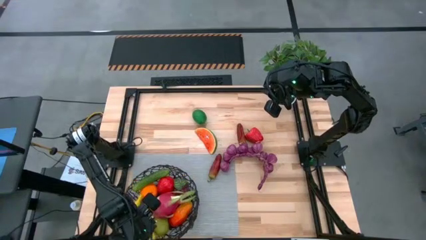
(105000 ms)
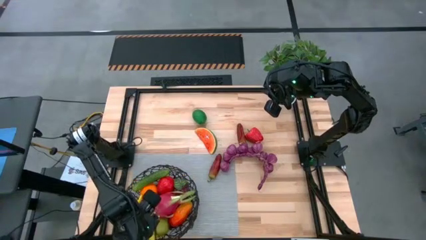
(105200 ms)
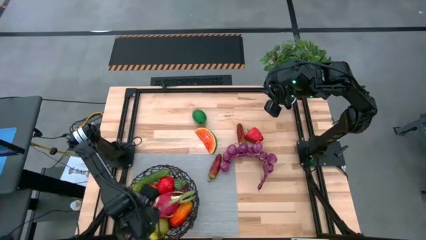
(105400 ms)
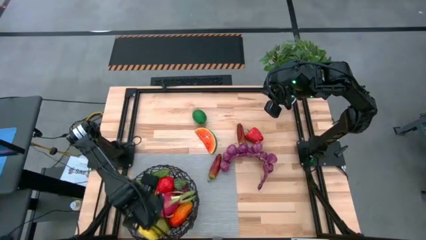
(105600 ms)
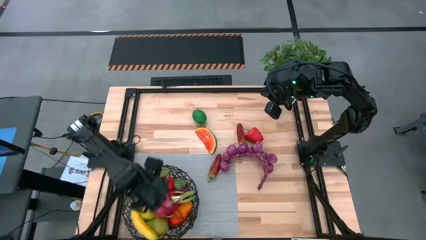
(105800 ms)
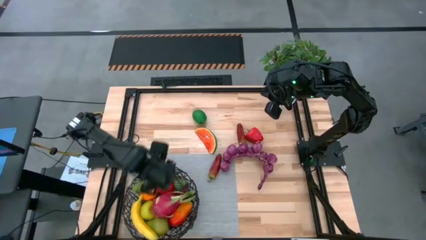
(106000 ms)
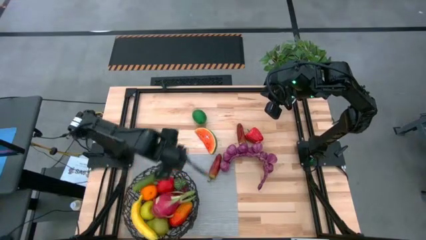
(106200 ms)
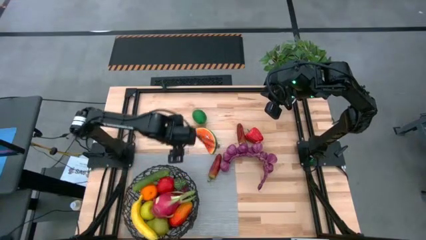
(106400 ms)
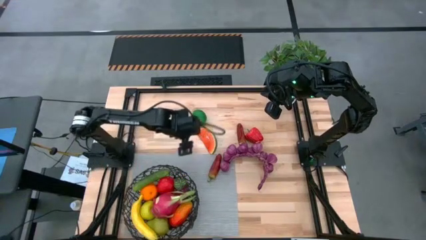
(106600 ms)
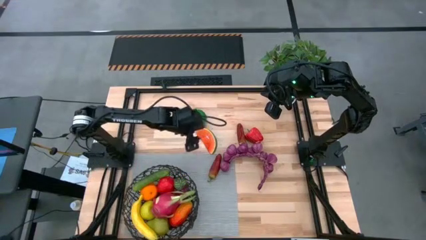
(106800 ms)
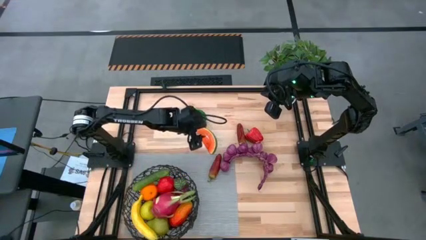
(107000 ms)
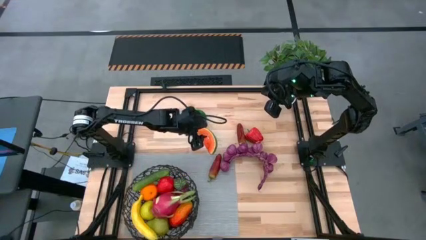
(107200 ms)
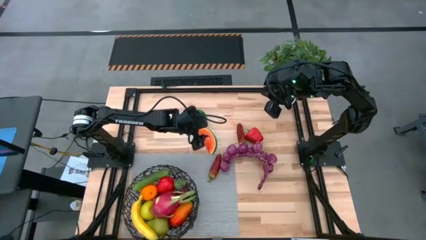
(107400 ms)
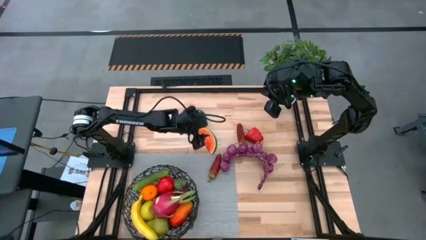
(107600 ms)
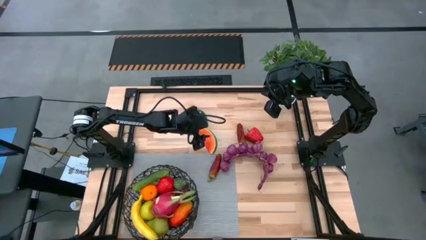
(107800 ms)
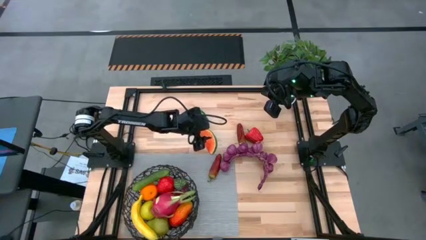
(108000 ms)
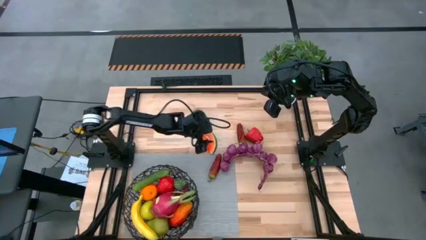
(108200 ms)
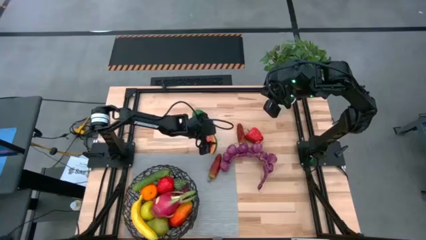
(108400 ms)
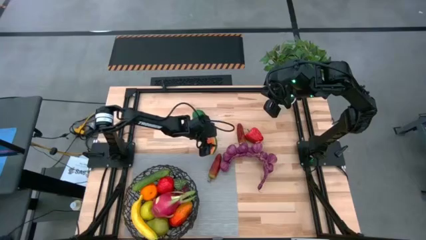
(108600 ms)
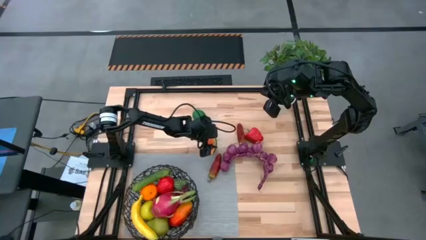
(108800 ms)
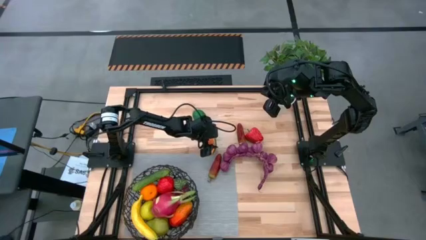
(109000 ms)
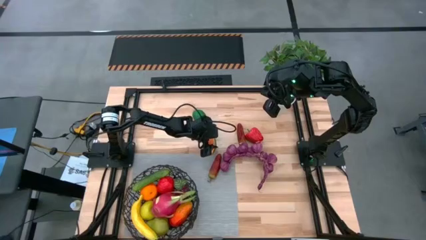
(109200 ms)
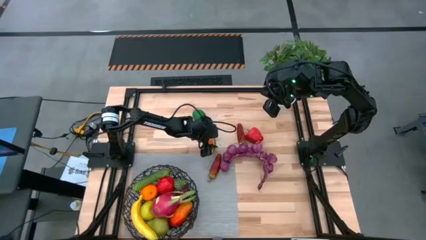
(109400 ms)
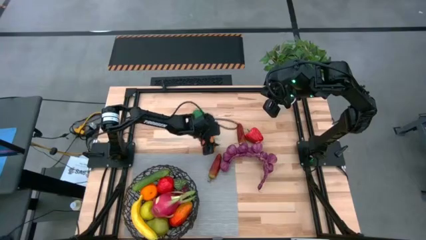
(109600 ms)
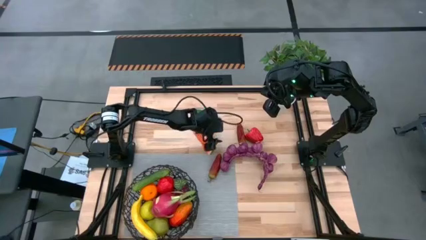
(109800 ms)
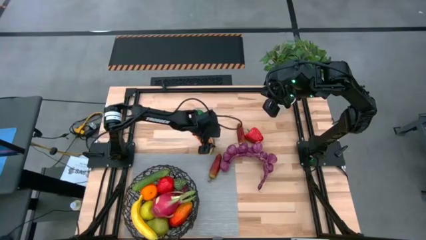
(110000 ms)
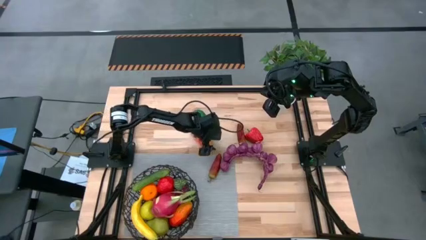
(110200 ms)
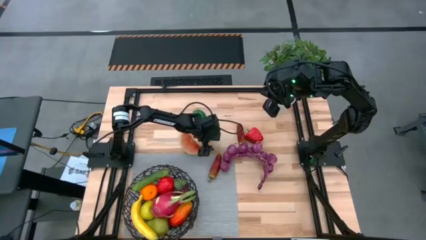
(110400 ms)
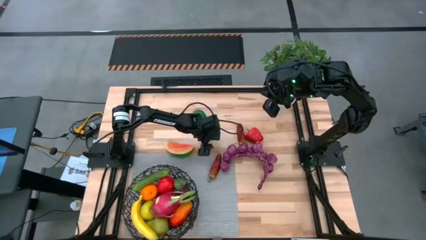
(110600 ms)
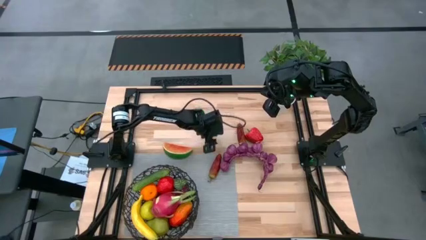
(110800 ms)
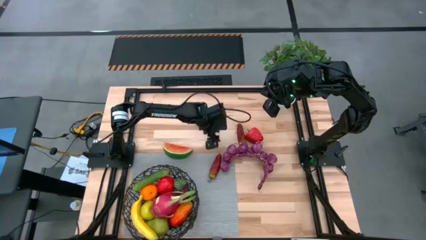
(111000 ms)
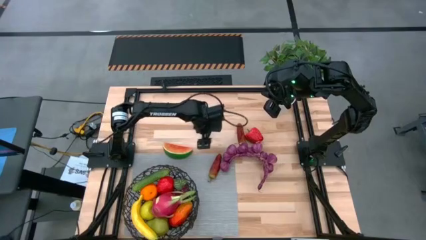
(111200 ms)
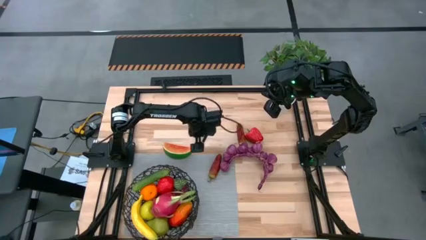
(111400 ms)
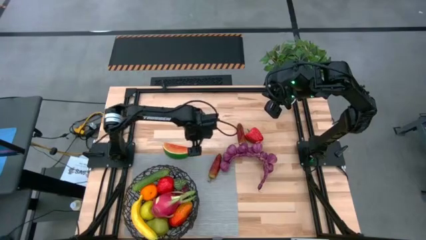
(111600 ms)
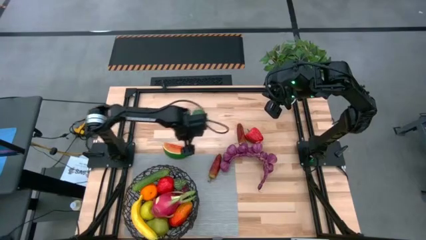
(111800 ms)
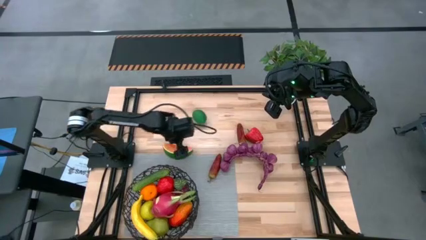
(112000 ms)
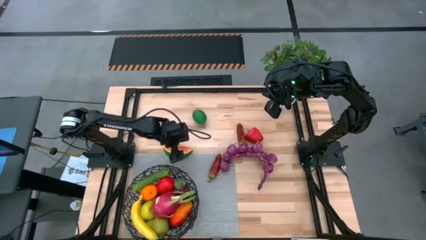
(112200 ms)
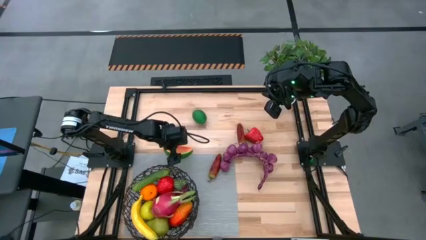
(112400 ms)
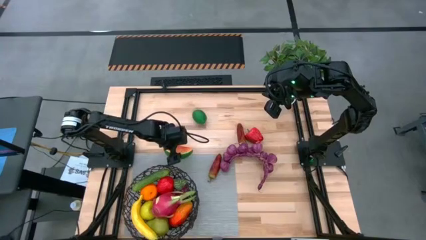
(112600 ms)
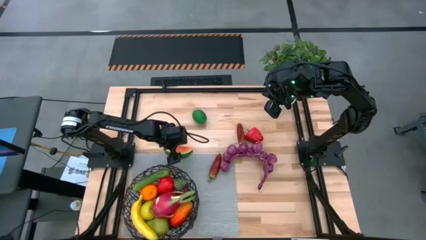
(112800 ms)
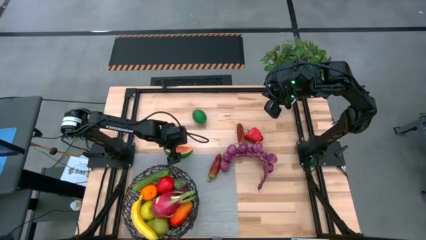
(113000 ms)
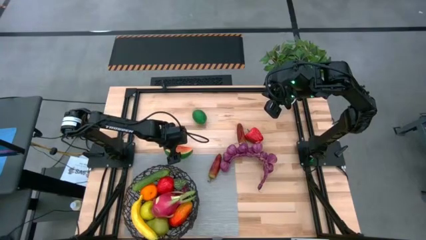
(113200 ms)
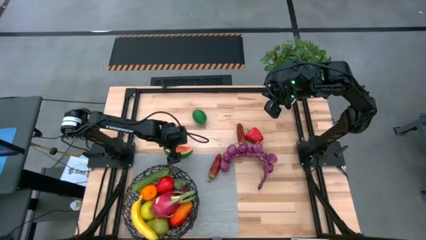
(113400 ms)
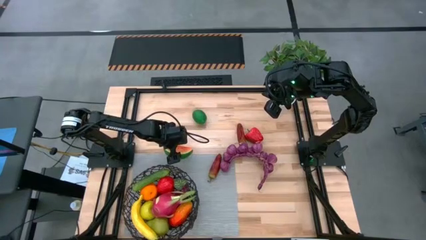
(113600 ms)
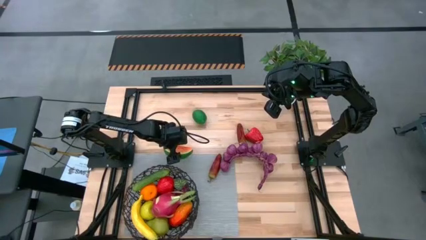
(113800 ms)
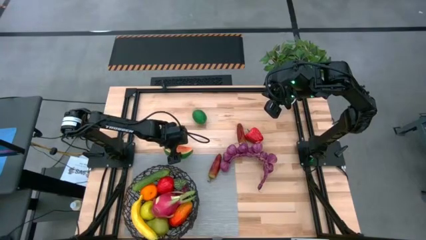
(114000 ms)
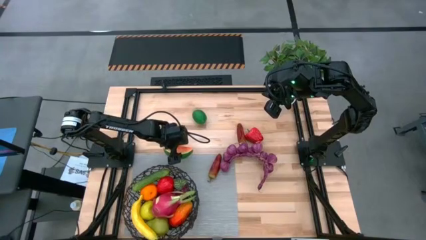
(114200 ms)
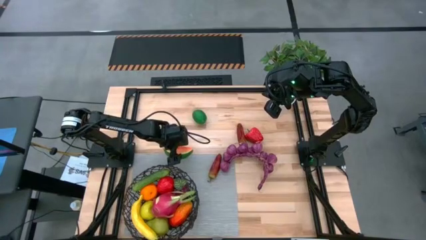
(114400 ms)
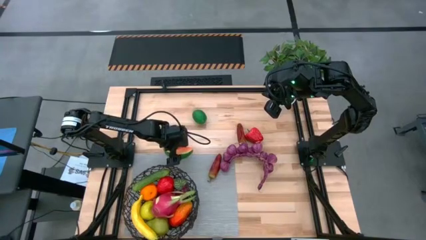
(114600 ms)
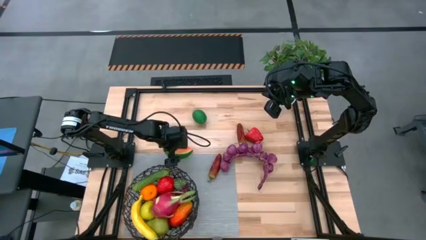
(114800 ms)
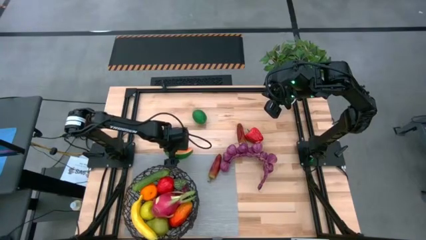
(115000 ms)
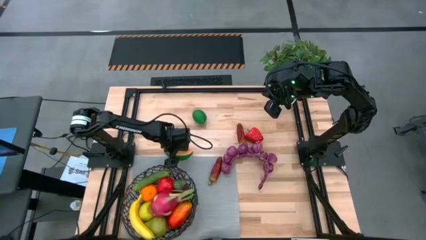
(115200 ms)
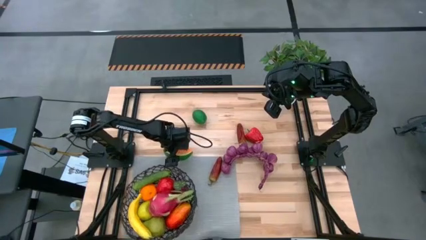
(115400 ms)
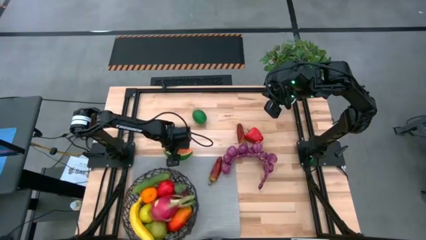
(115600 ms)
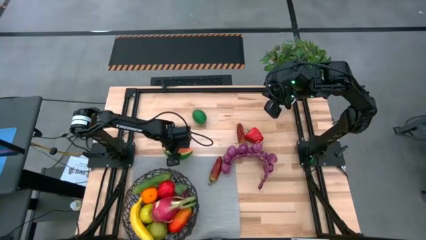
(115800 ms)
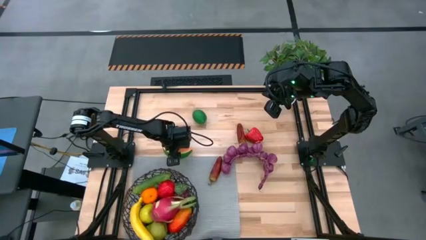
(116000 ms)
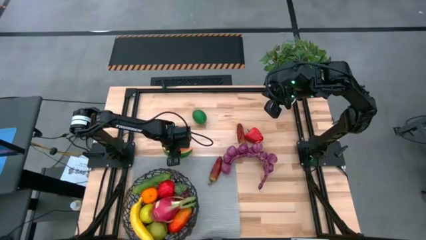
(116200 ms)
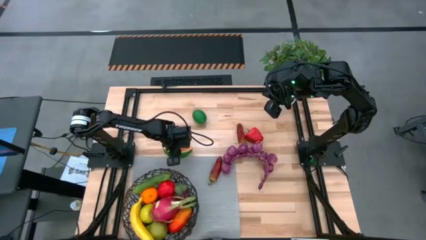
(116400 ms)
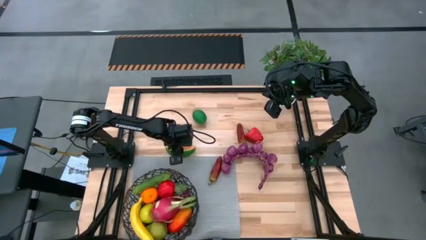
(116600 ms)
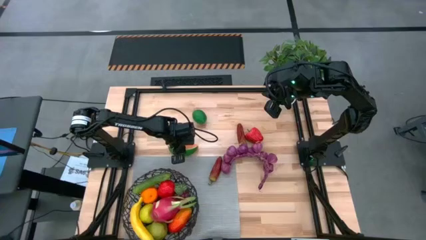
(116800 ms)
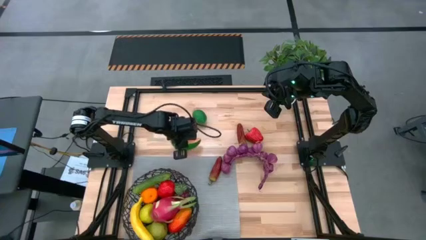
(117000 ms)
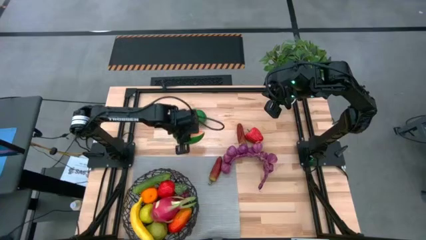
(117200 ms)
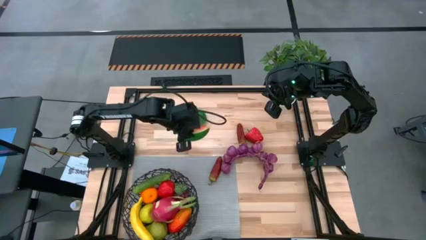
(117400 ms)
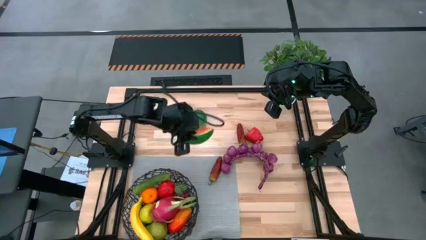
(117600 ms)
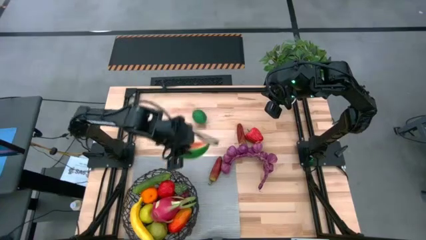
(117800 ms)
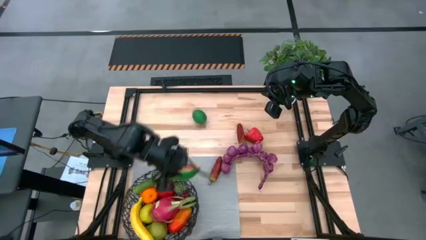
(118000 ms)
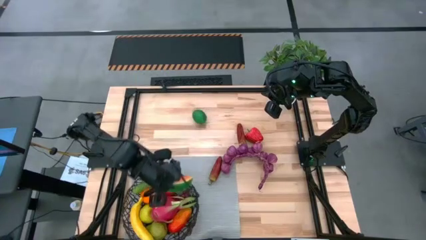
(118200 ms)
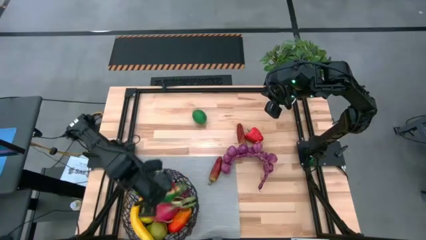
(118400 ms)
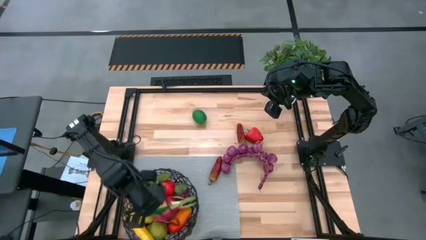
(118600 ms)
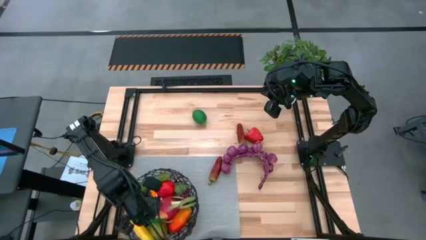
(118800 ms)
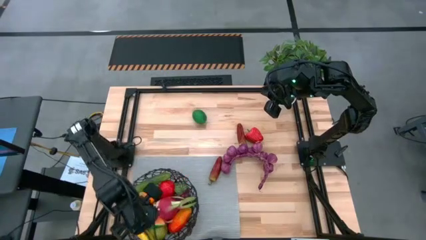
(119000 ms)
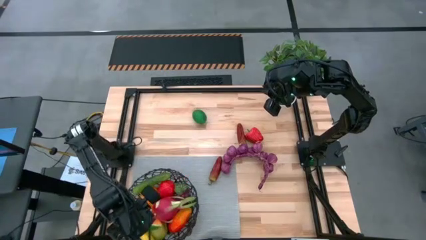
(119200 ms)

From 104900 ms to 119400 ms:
Task: Build produce basket
Put the watermelon into the black wire basket

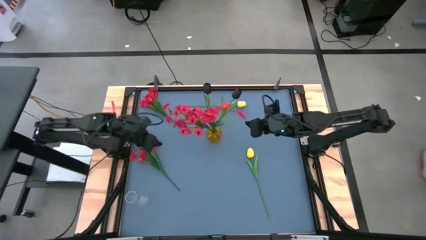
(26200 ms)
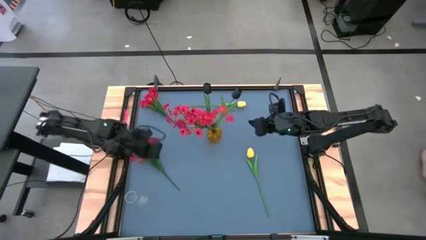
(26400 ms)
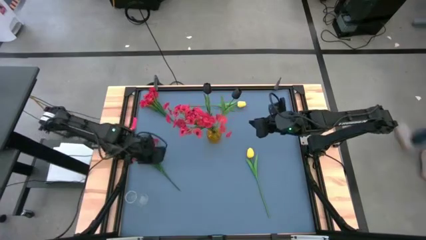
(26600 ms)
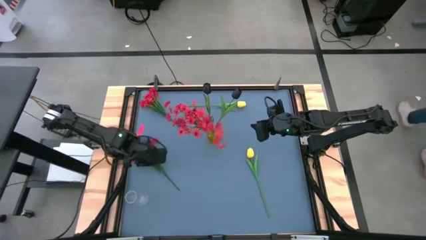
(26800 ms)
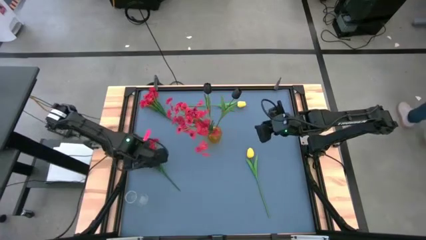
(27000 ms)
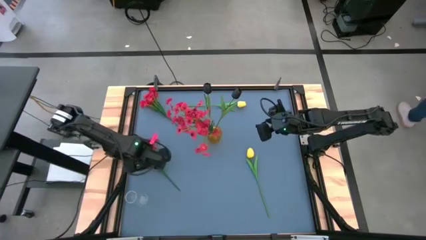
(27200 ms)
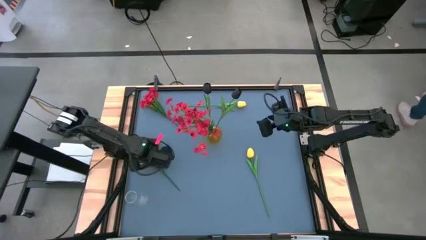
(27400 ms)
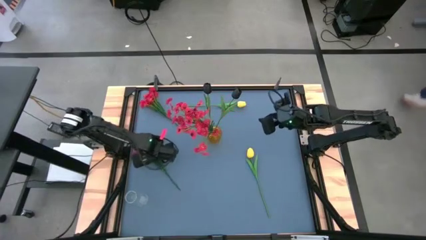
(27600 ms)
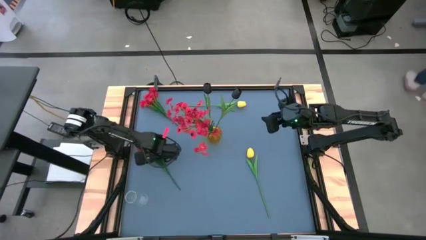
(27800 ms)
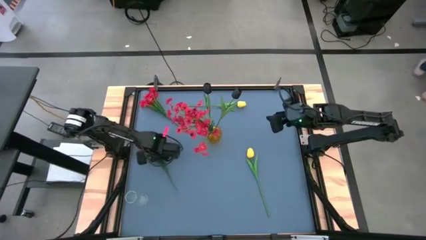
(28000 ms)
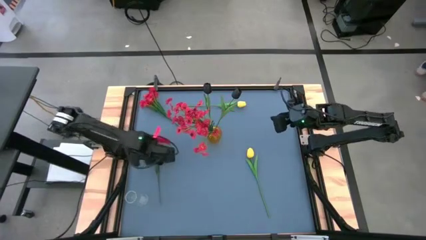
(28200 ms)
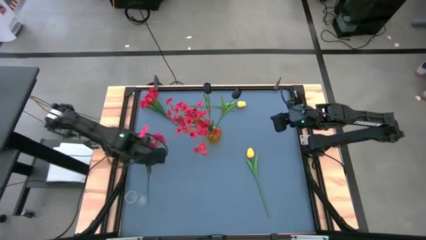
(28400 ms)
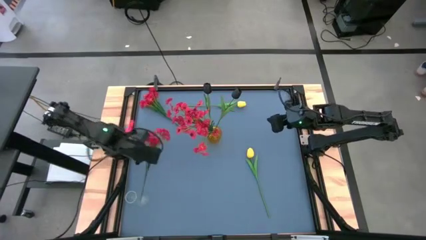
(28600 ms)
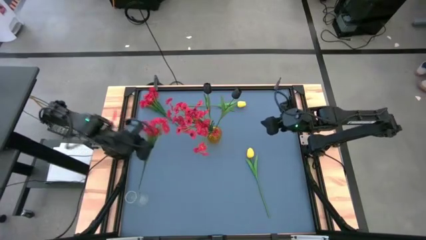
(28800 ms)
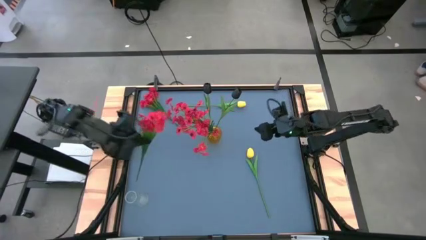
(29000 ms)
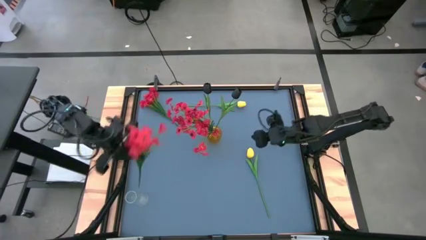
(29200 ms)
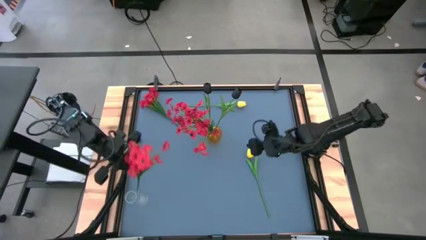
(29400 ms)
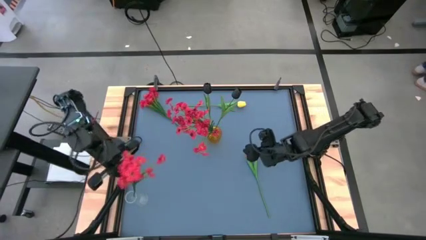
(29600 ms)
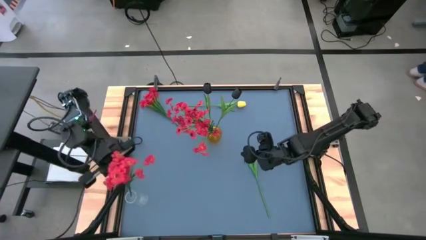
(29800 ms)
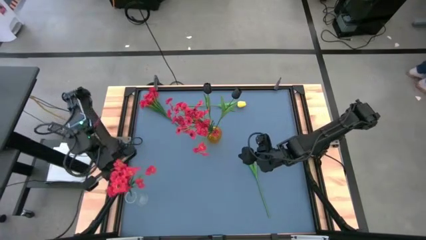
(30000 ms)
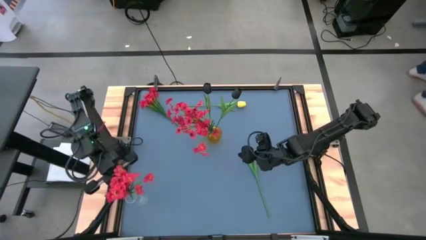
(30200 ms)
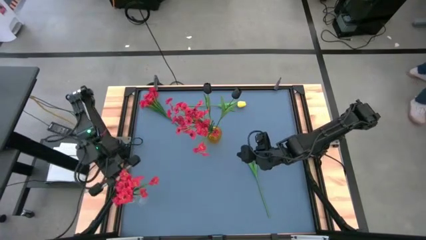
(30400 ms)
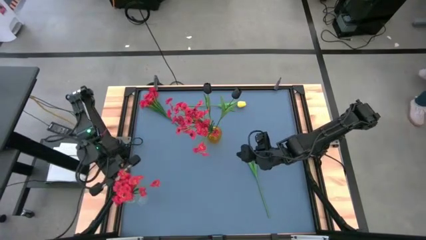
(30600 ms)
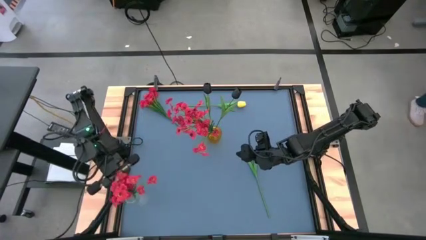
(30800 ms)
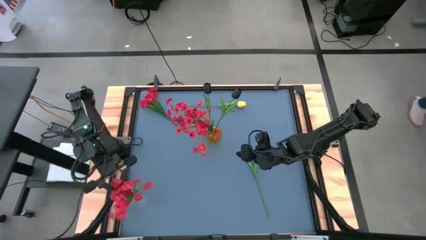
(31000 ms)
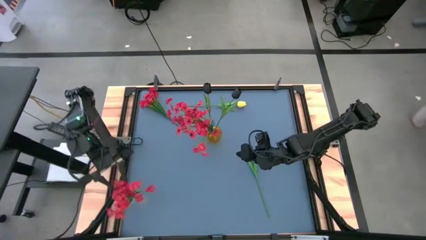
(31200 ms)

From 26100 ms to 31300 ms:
Task: Sort flowers into vase by color
Put the bottom red flowers into the transparent vase
